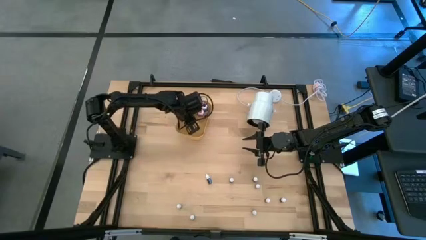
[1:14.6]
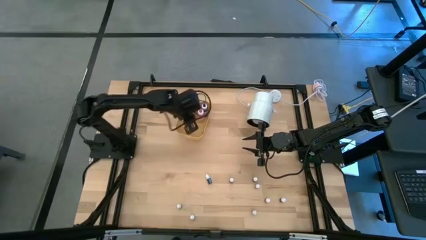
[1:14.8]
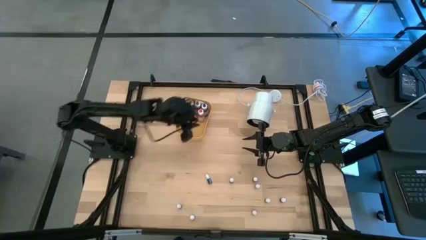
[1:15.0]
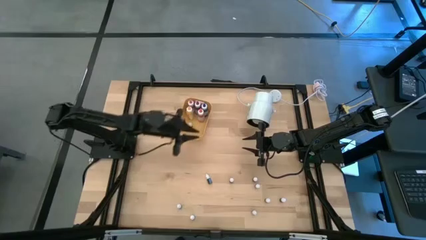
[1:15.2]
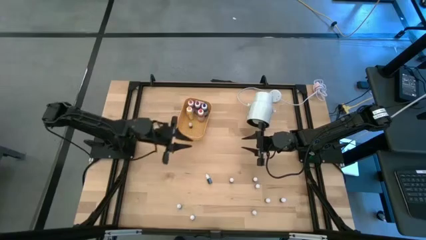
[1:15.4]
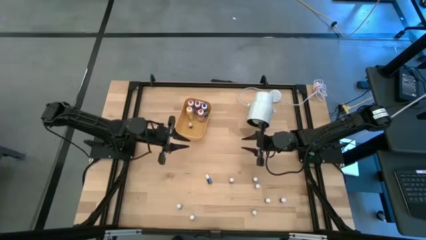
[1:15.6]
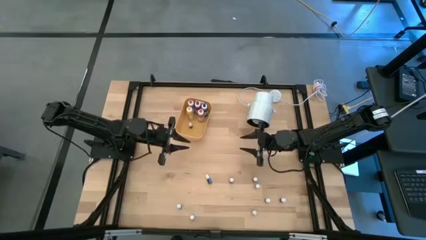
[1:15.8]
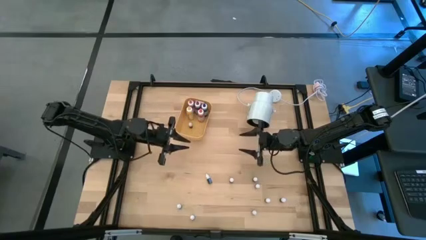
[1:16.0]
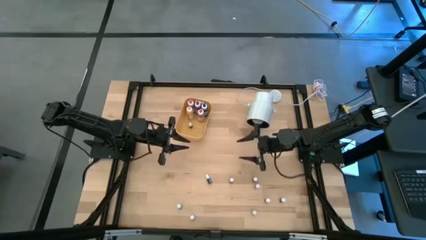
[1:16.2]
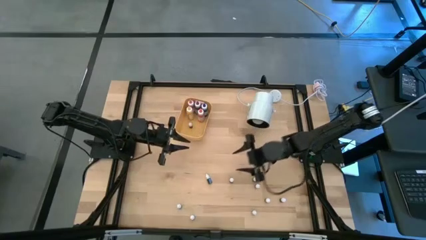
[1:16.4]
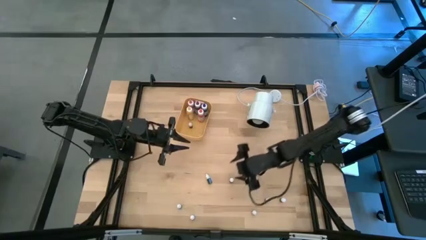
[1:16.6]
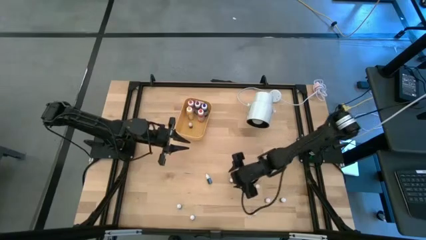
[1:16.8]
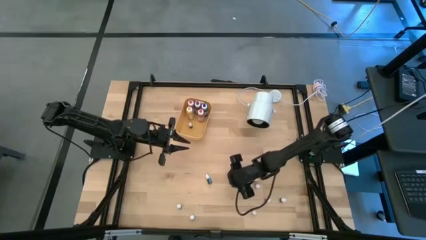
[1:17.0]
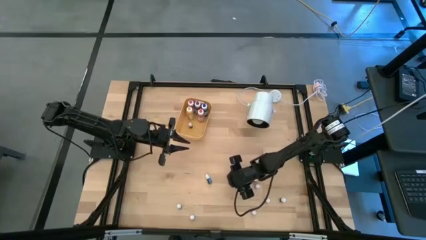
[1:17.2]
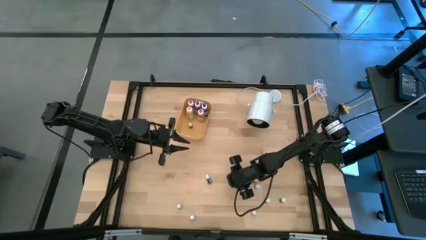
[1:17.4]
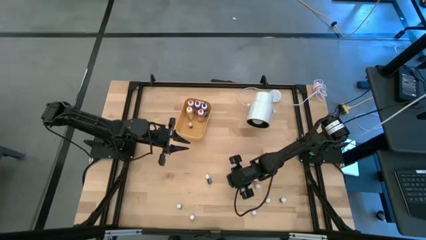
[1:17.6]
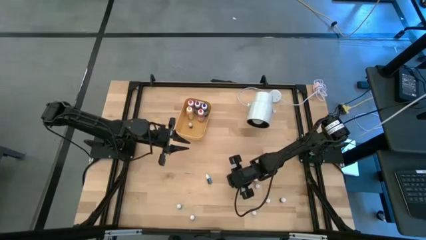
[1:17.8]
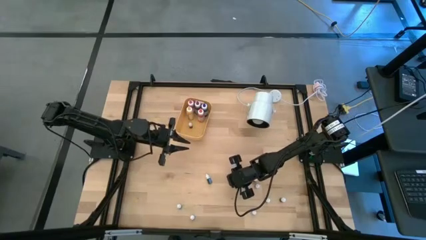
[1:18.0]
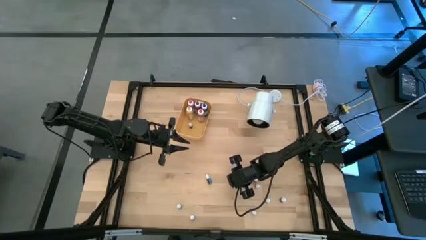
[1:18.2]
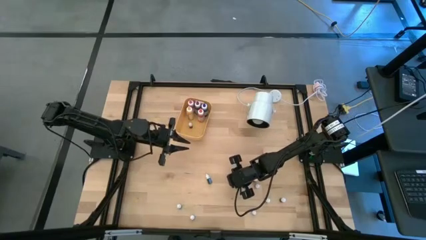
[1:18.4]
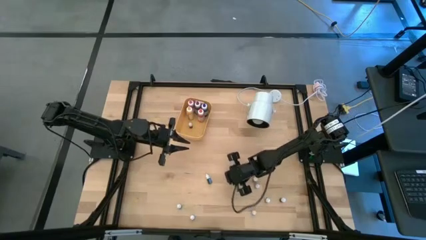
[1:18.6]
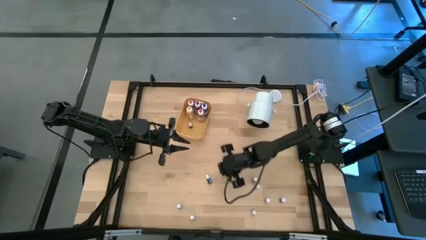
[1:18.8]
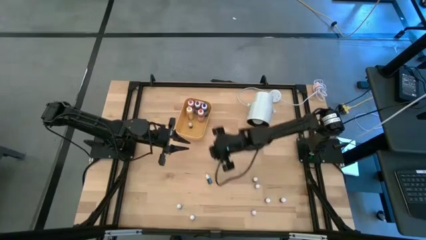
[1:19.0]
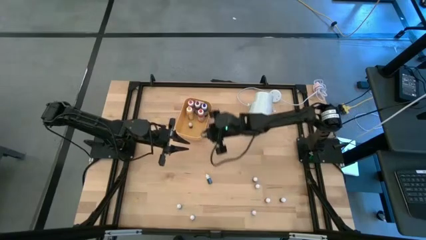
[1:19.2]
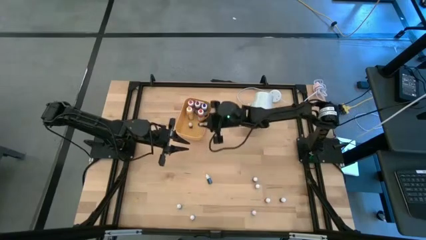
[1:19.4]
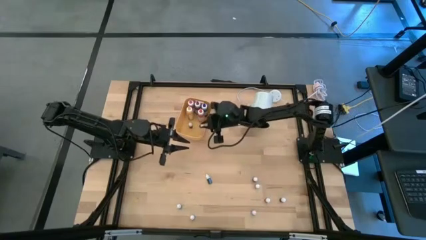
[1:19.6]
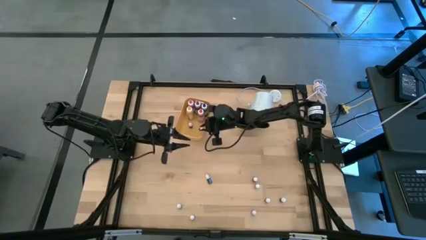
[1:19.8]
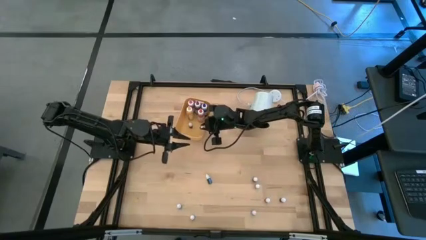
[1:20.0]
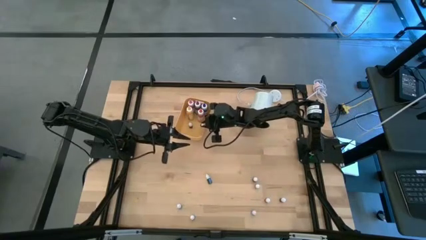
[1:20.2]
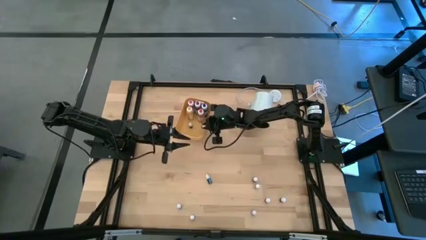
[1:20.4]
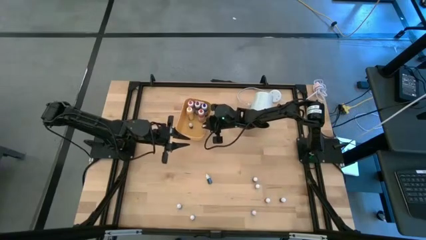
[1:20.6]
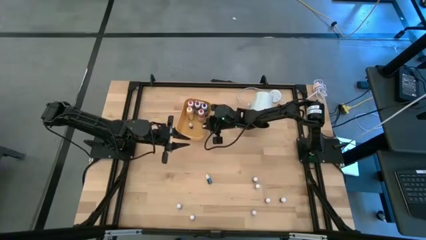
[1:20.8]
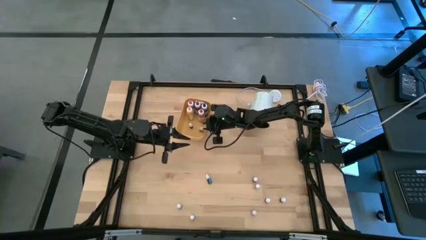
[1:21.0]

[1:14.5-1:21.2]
Task: Pick & Place food coloring
Put the right small purple food coloring bottle into the yellow bin

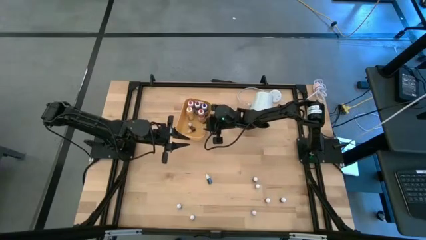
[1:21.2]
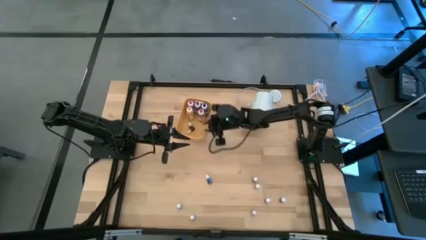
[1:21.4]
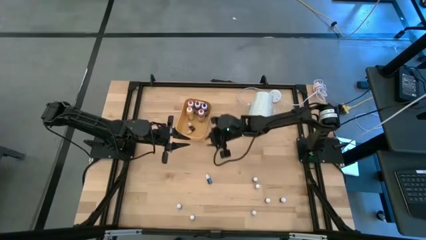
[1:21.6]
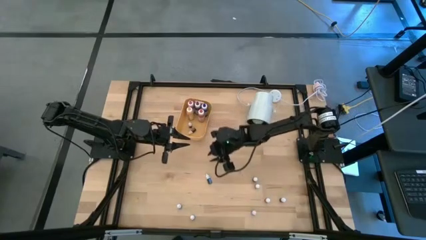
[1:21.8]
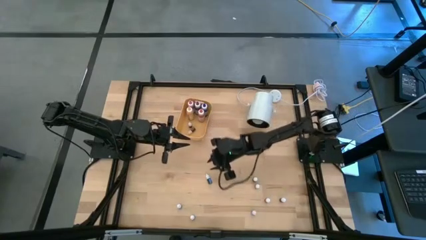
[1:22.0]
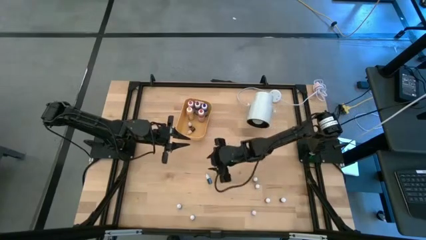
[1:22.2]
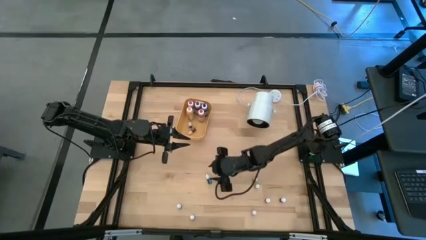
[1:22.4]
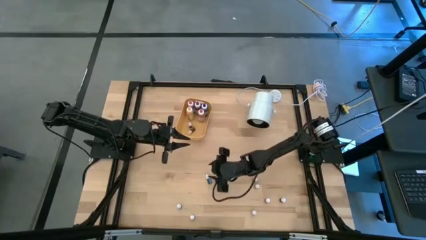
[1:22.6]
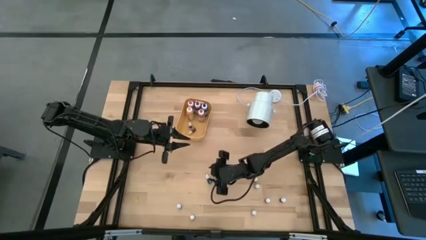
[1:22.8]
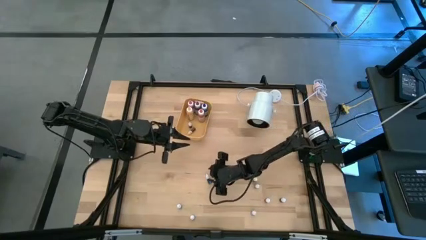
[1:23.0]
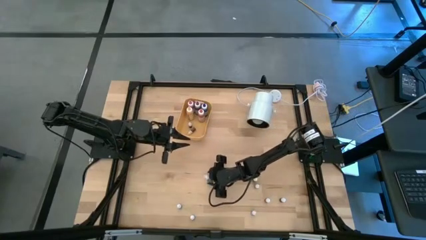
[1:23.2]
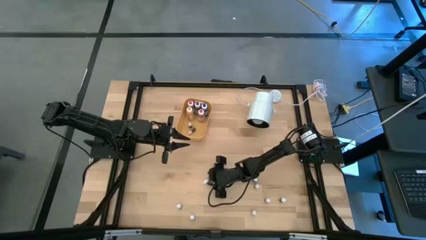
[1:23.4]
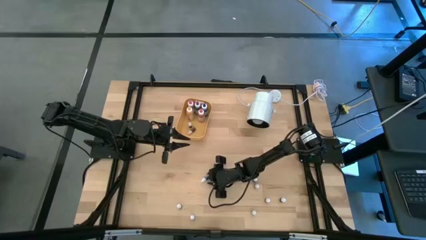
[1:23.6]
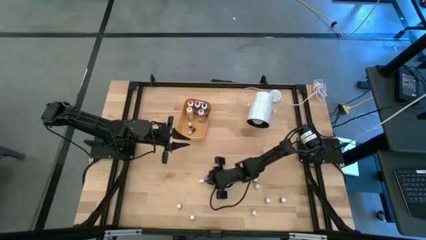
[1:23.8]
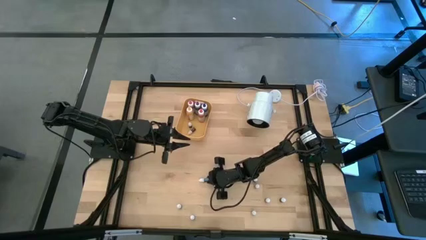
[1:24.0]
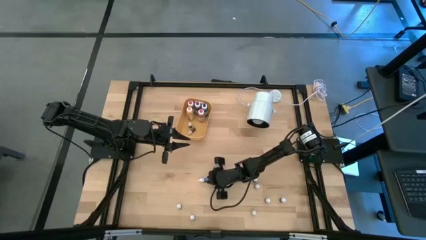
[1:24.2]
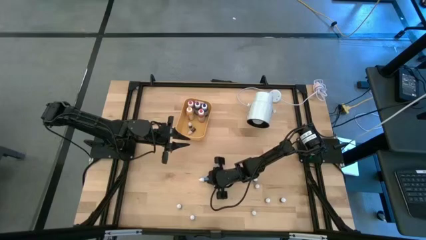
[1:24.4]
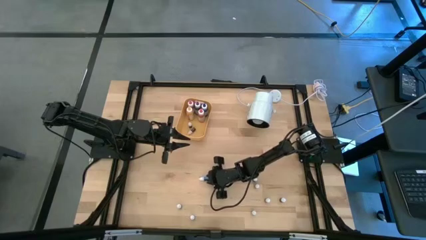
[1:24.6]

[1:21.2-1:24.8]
Put the small blue food coloring bottle into the yellow bin

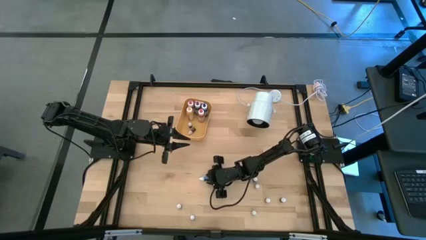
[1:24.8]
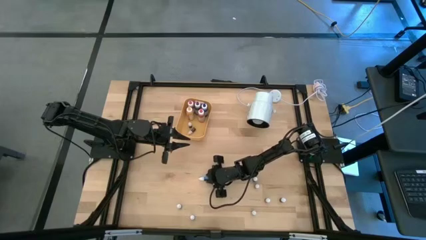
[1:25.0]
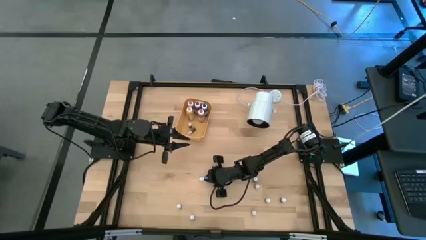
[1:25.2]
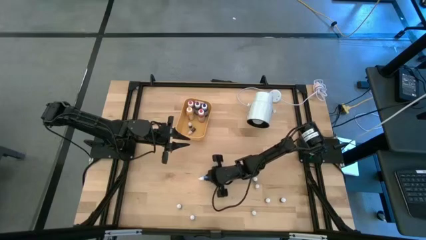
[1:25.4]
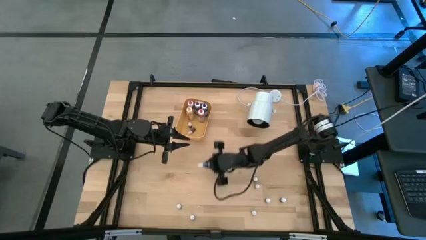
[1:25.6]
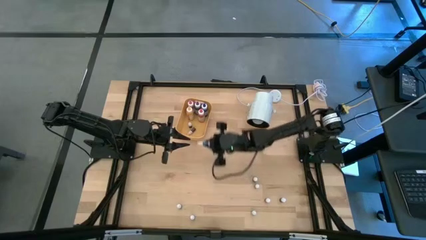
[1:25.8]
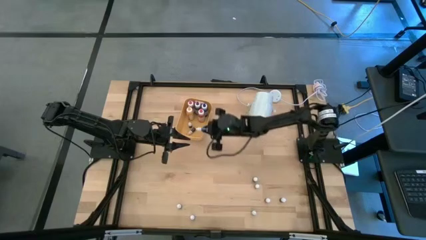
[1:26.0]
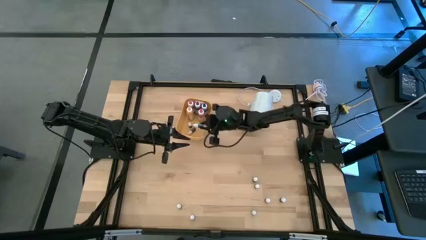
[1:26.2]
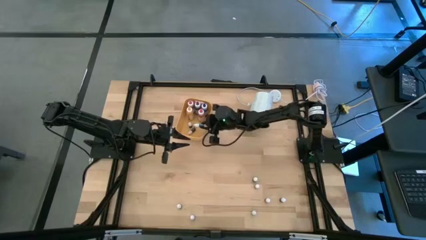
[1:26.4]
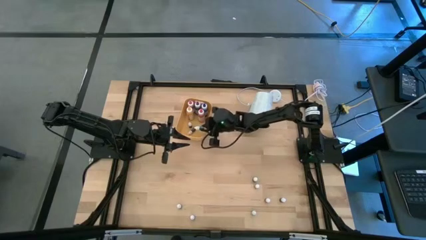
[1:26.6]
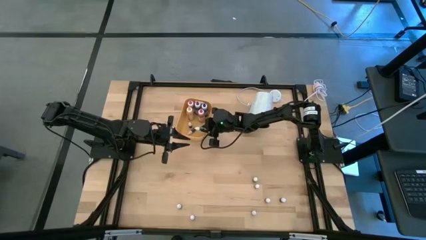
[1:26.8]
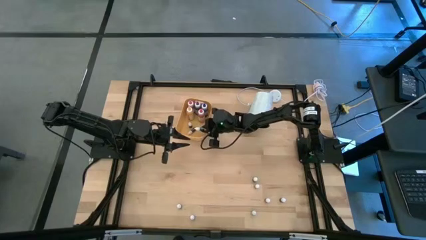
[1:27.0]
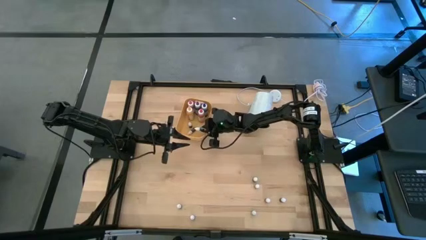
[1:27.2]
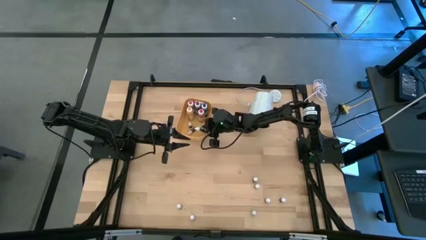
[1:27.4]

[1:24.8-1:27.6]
Put the small blue food coloring bottle into the yellow bin

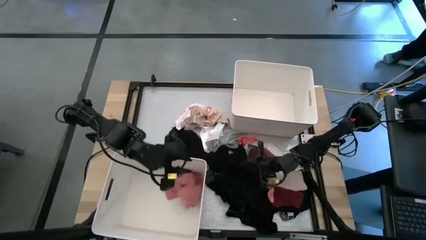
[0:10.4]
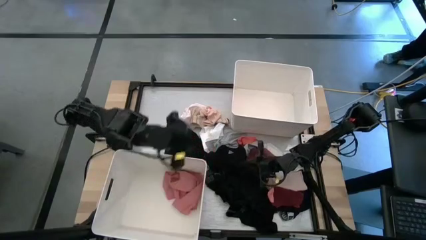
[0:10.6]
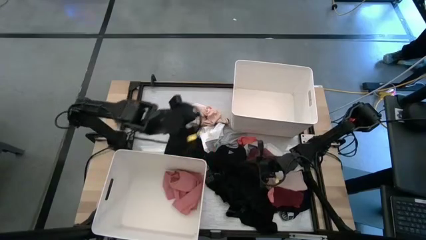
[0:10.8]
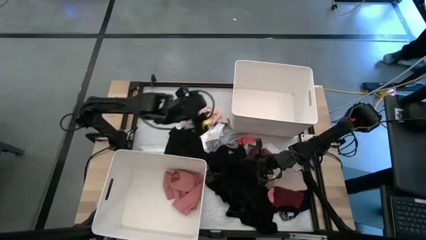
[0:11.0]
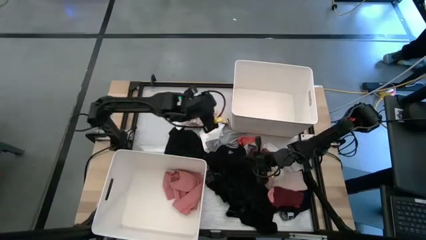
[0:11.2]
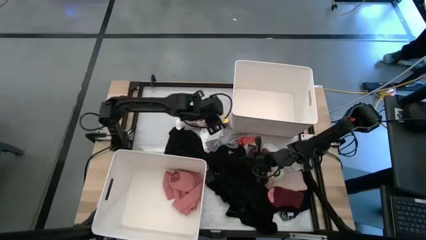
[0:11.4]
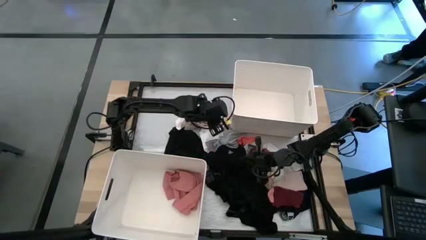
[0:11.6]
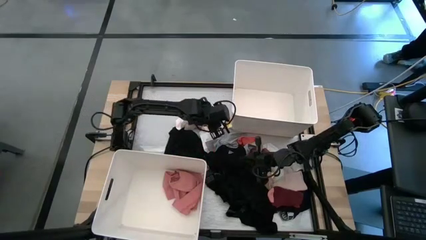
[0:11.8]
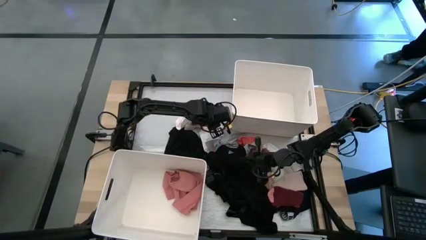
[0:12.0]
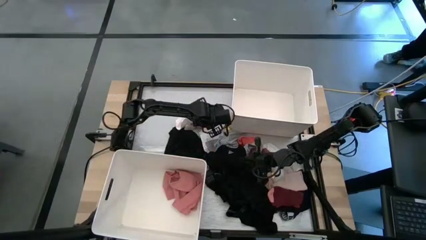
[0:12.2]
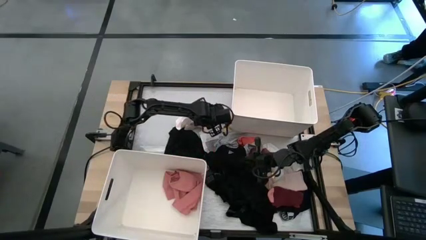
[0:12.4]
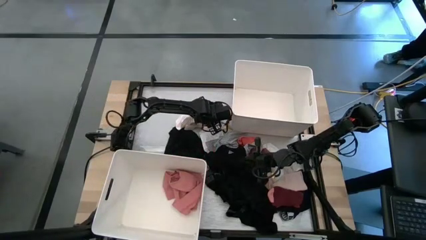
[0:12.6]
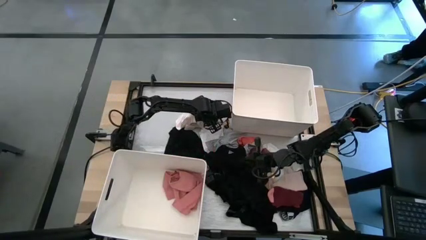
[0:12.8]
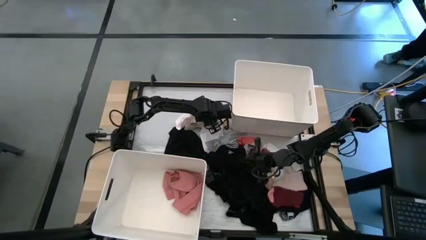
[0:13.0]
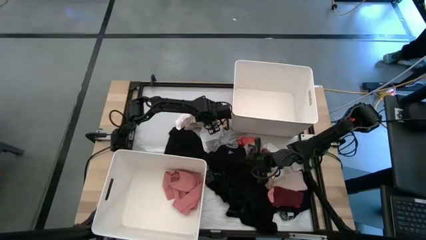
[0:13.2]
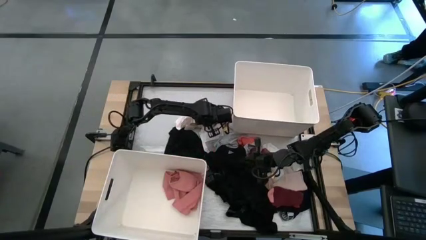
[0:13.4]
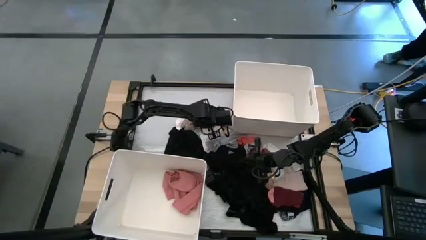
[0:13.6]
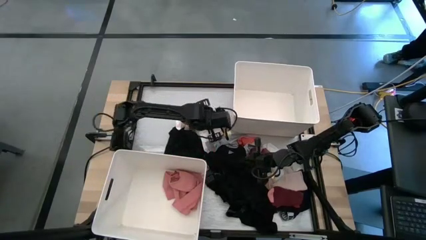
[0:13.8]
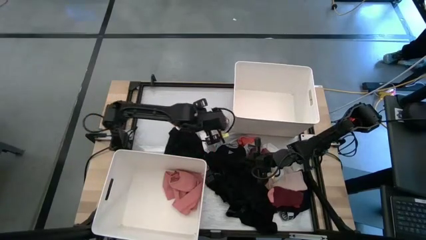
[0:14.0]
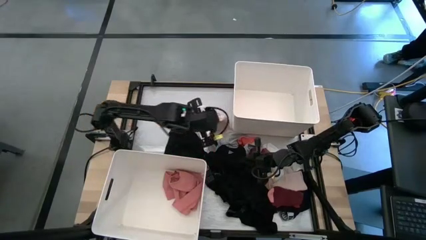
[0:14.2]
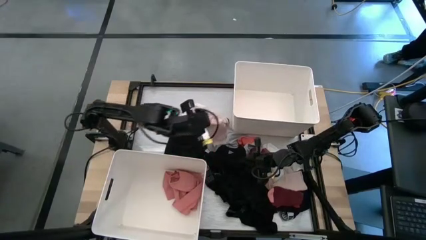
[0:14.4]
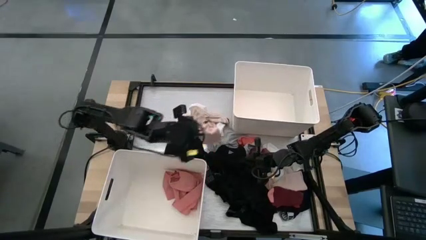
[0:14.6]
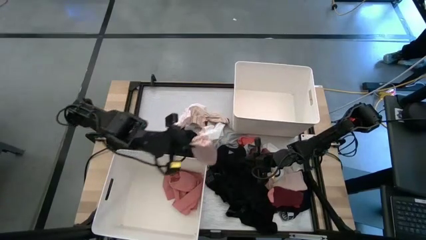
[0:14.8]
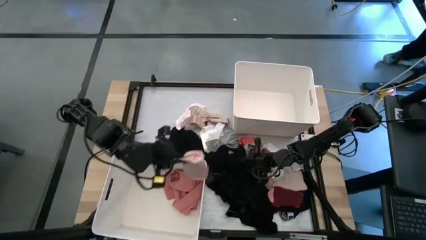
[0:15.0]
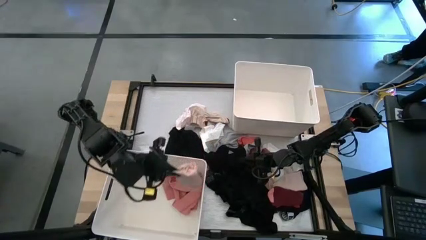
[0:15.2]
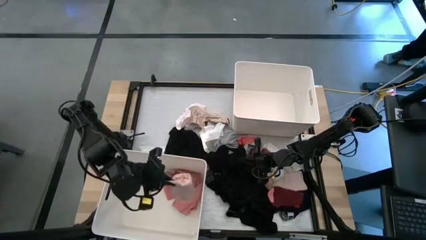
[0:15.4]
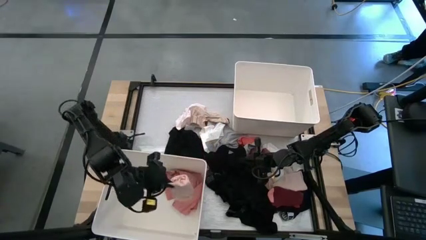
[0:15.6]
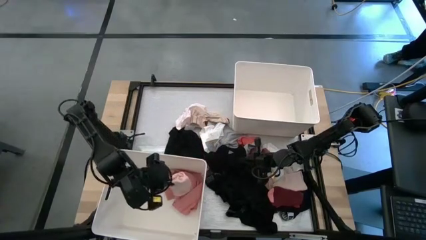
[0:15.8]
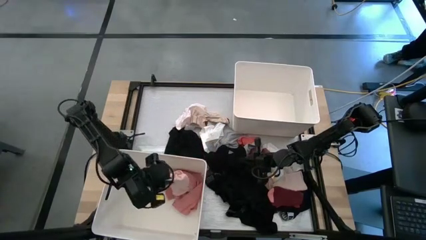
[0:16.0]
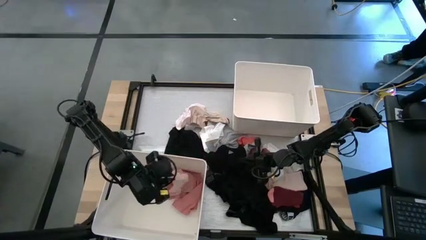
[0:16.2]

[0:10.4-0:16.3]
Task: Sort clothes
Put the light pink sock into the bottom white bin
